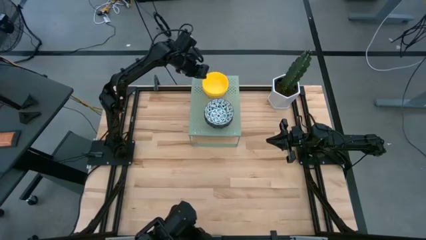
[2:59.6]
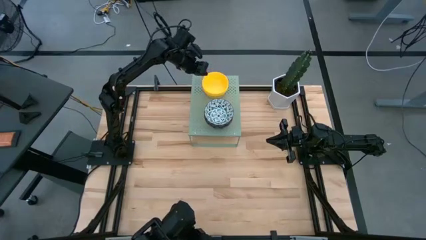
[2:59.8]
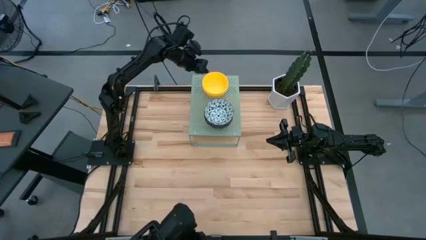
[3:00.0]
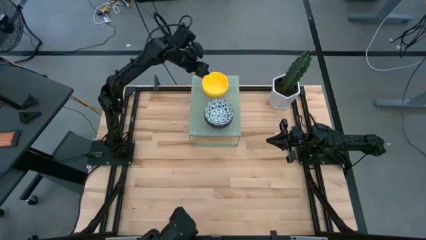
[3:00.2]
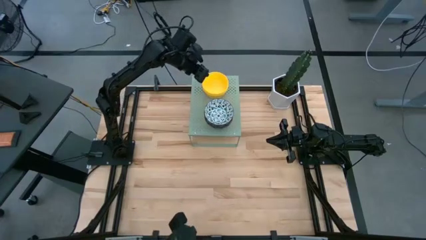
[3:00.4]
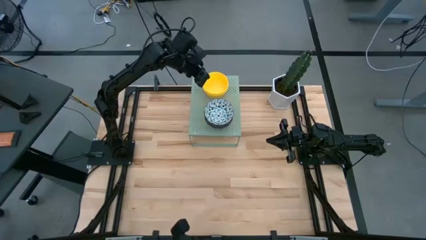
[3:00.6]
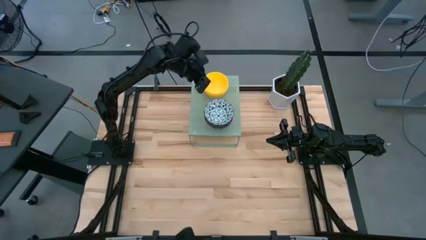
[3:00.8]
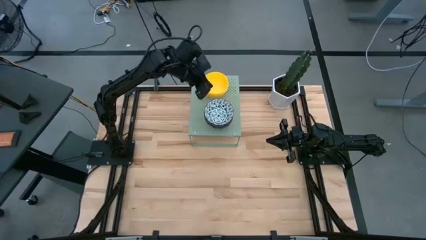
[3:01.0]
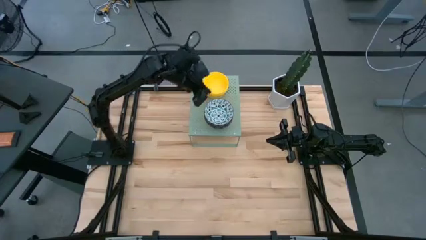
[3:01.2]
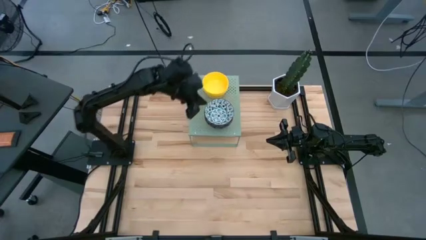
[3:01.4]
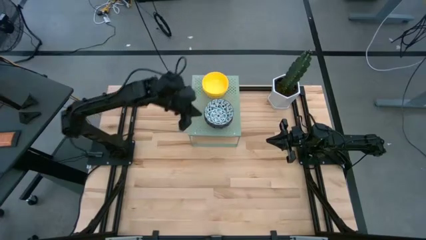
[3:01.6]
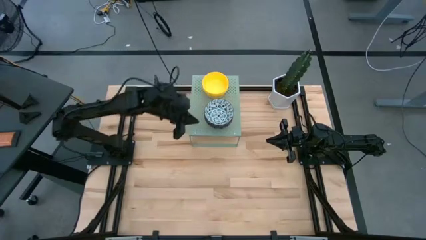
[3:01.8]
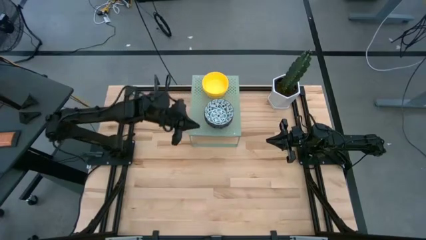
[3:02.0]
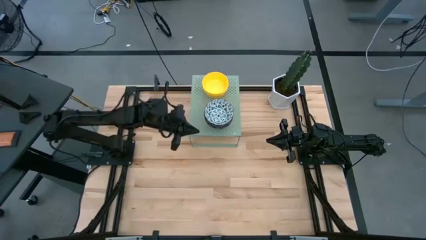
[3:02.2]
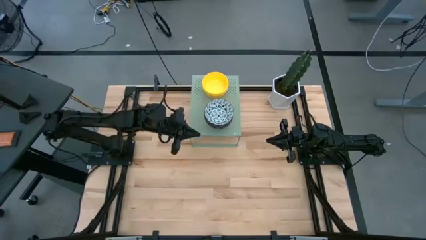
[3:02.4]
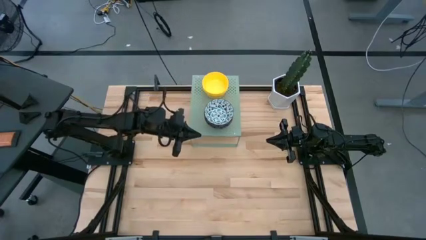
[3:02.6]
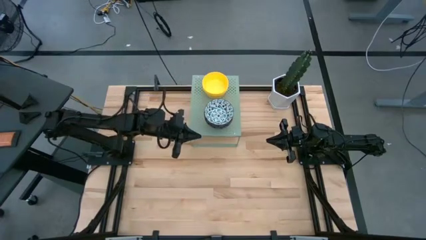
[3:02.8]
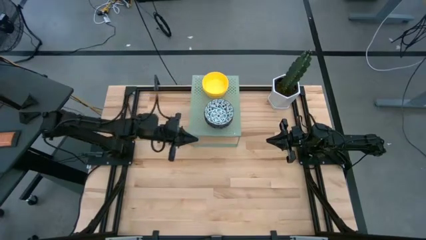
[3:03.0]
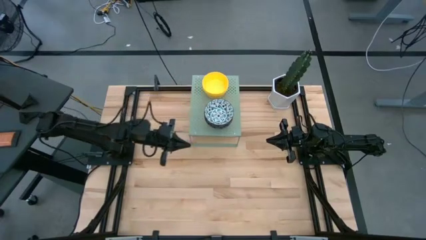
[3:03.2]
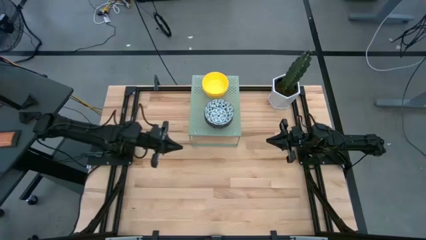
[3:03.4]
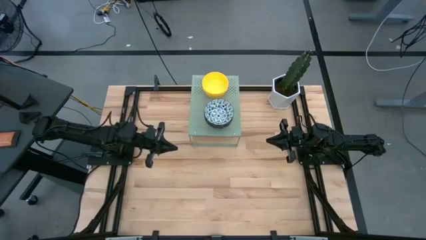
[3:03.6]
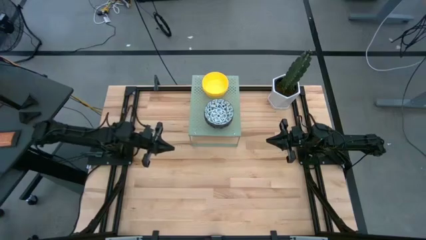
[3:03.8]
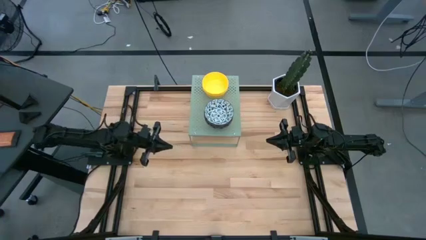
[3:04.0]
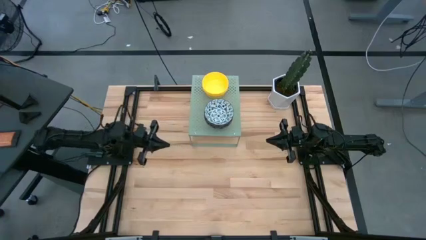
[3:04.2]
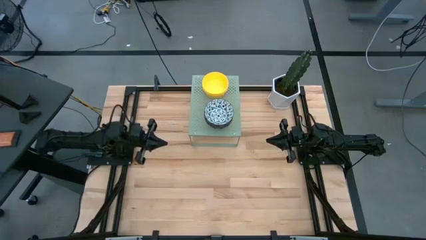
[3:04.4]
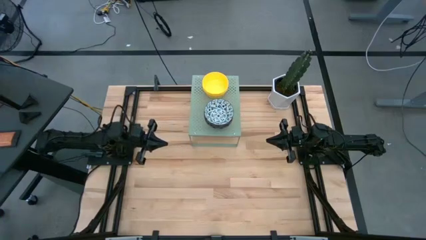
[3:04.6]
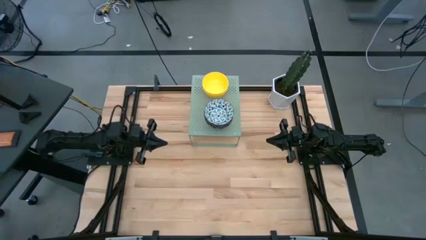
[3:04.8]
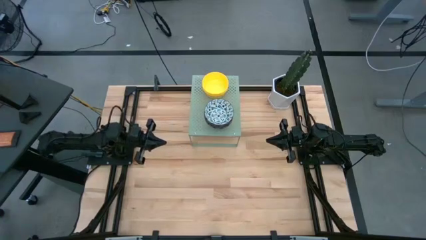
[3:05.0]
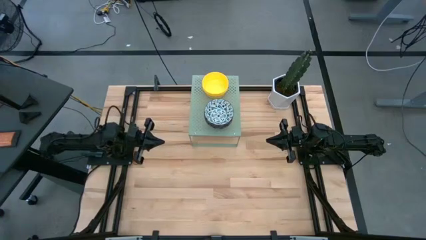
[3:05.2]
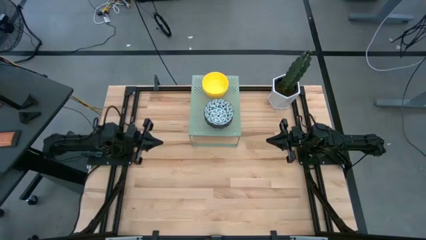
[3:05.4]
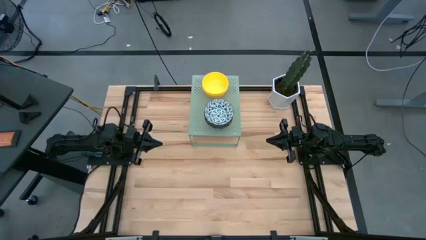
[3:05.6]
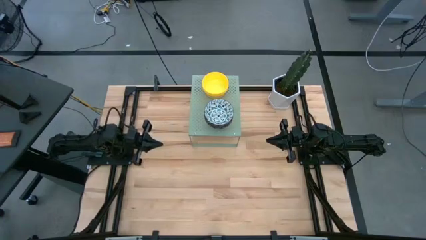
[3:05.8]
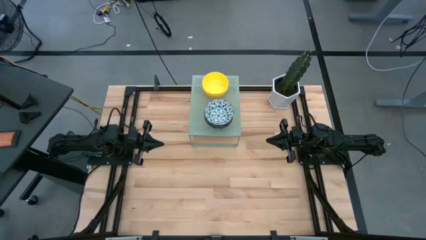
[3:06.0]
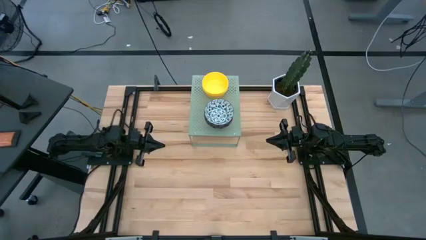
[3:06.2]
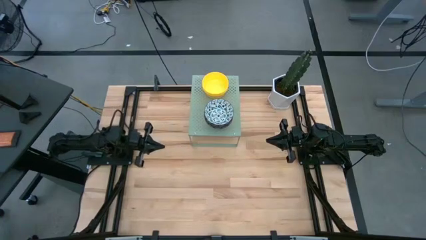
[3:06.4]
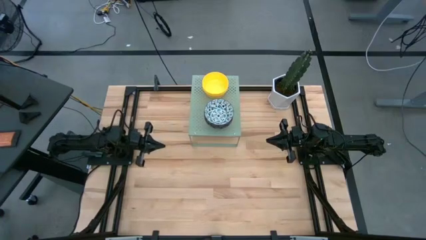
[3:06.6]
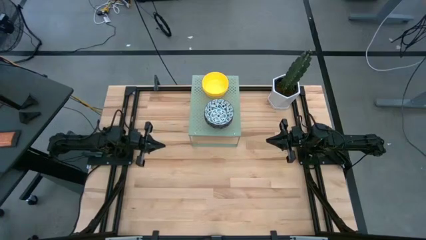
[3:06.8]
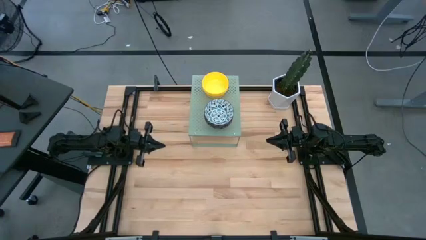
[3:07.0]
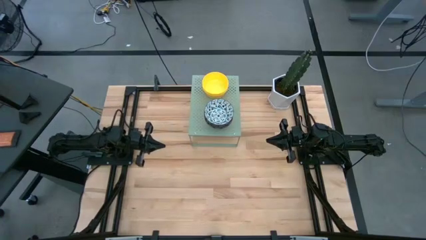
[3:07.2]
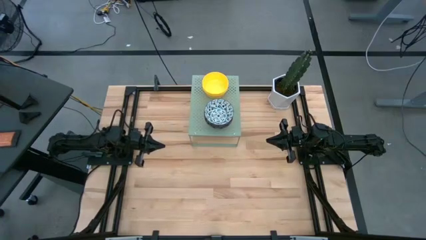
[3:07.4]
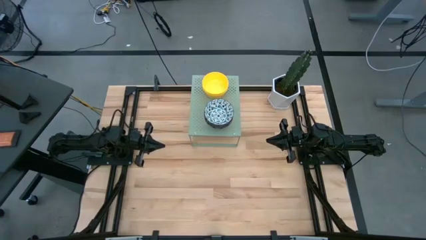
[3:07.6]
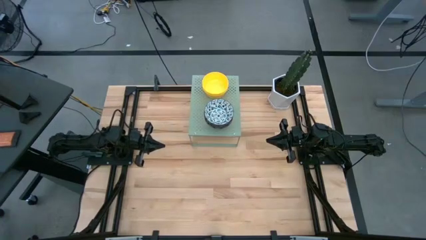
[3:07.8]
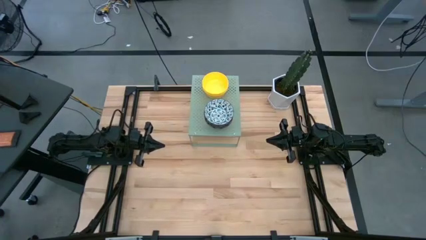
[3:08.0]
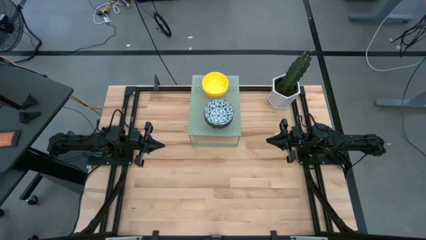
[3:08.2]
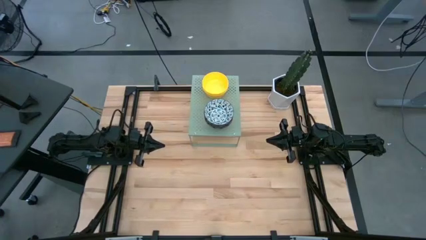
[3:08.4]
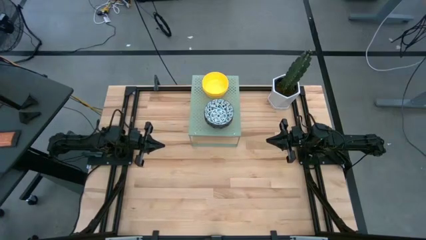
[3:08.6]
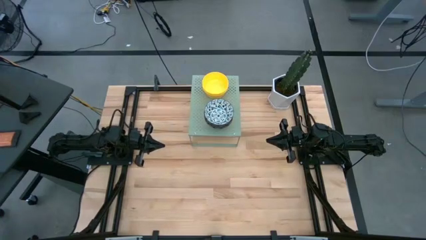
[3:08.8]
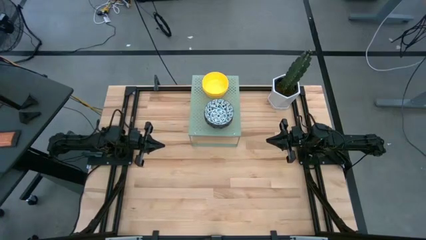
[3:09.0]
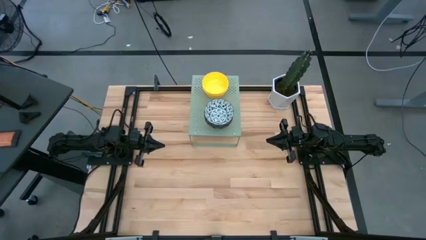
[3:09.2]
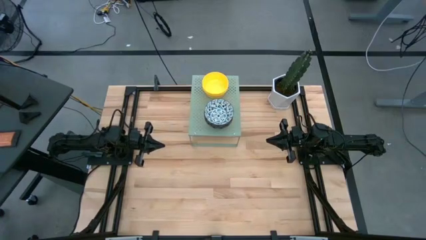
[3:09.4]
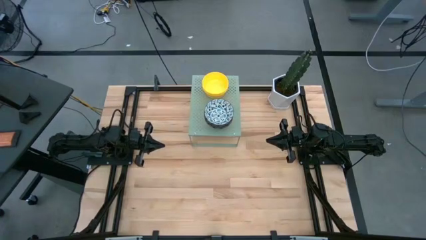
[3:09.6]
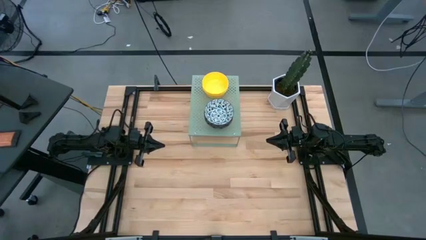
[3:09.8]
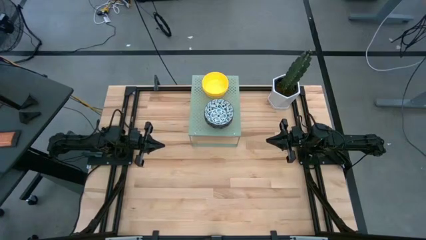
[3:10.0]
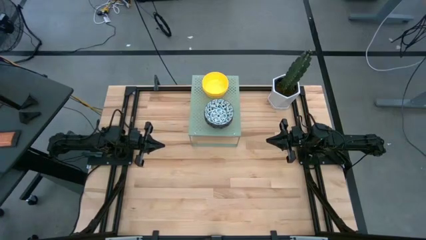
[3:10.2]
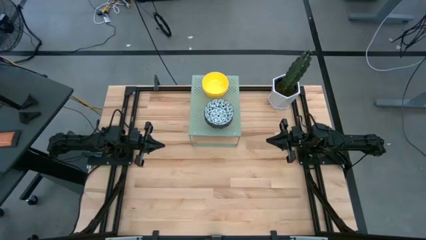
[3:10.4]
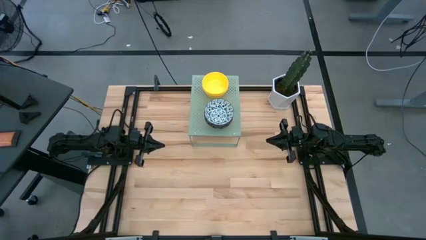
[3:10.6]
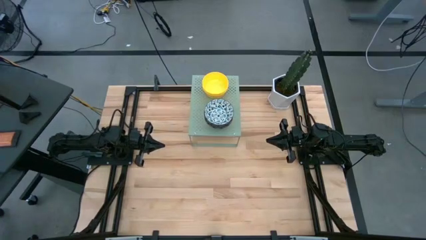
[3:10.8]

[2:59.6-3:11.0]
Task: Pick & Place Mini bowls
Return to Home Position
